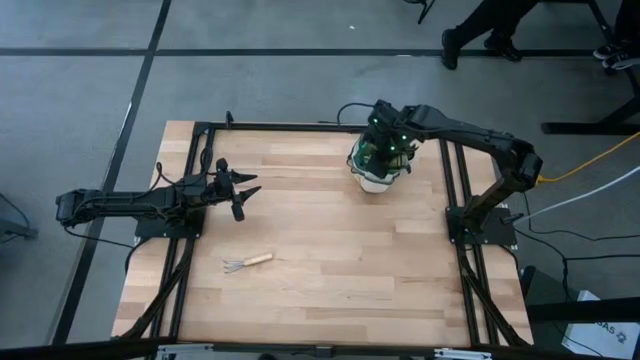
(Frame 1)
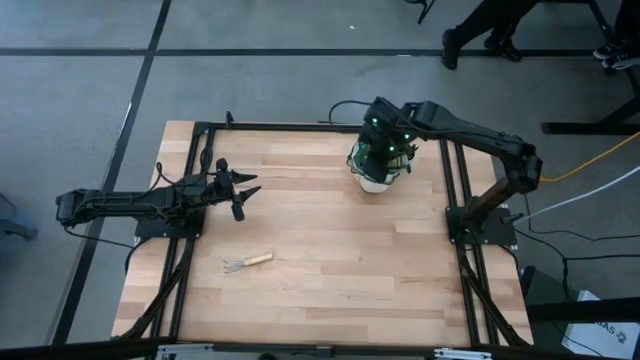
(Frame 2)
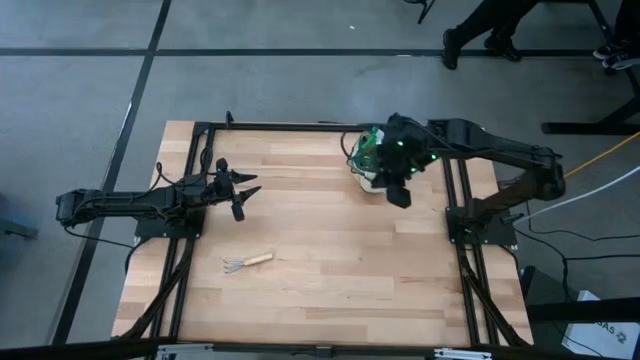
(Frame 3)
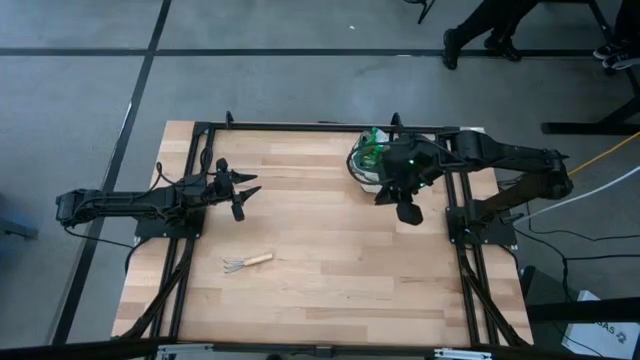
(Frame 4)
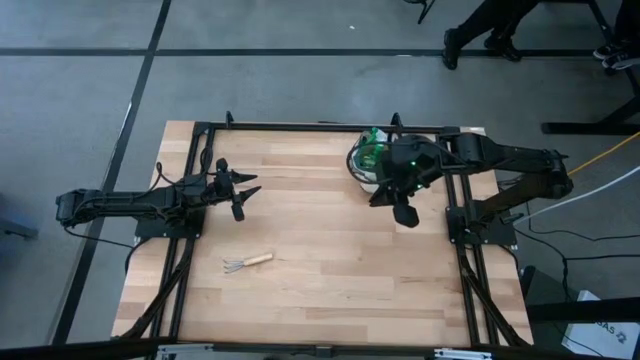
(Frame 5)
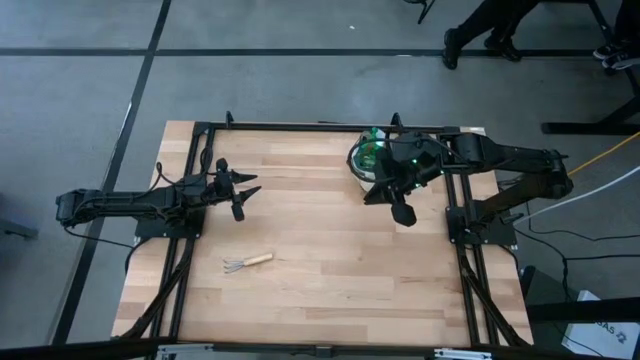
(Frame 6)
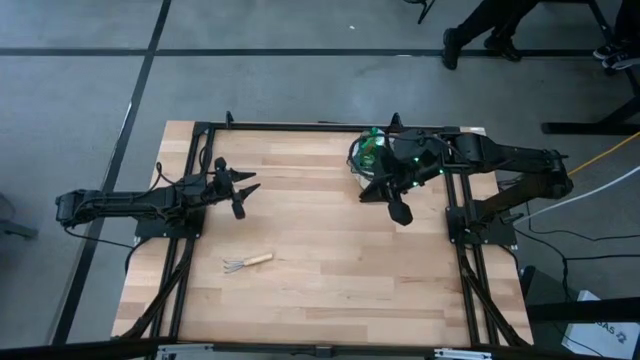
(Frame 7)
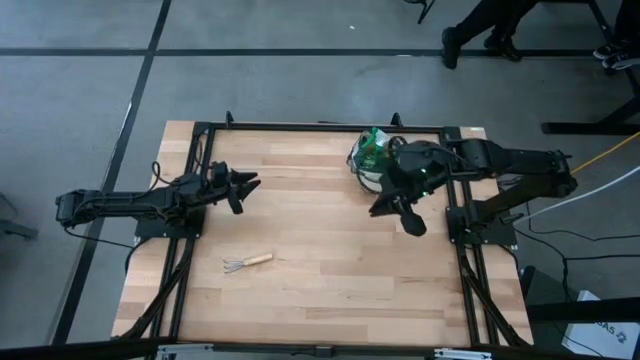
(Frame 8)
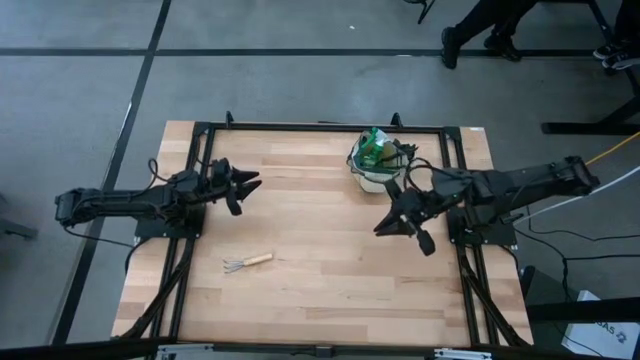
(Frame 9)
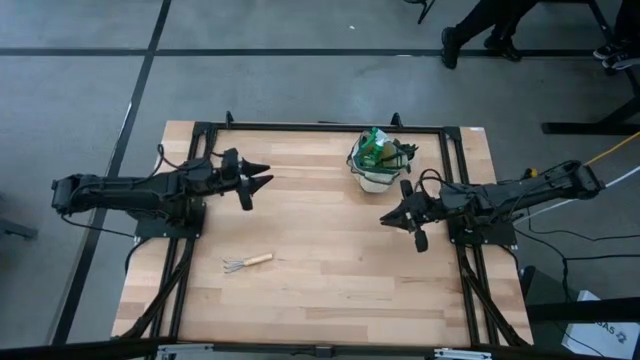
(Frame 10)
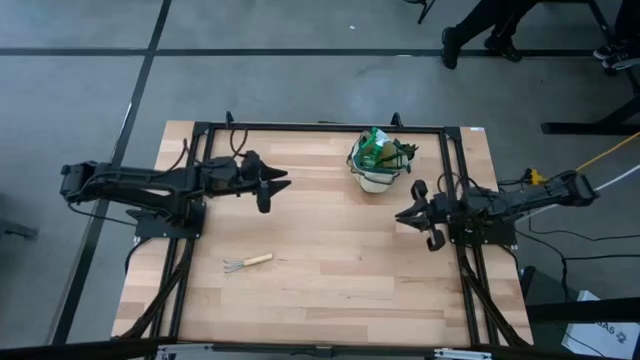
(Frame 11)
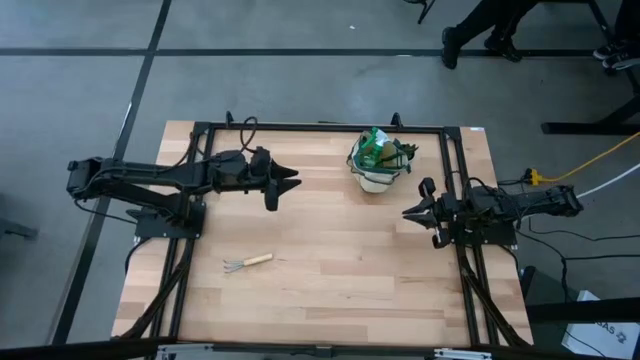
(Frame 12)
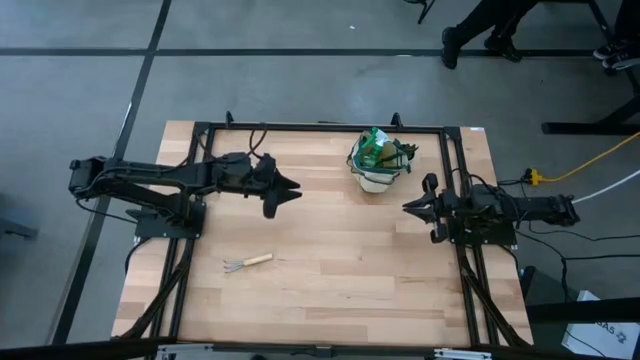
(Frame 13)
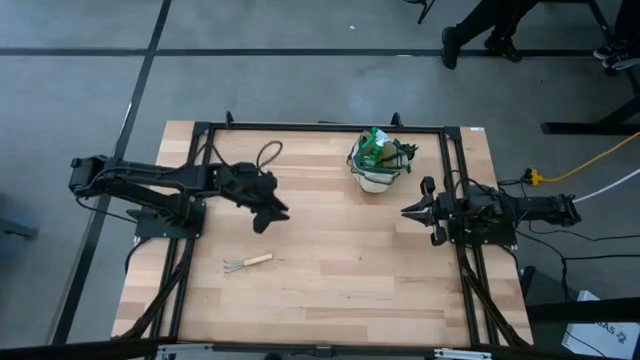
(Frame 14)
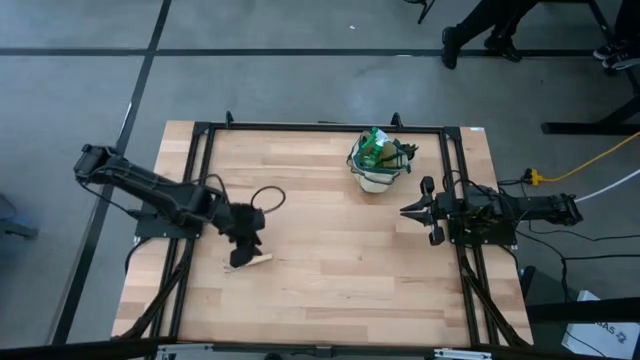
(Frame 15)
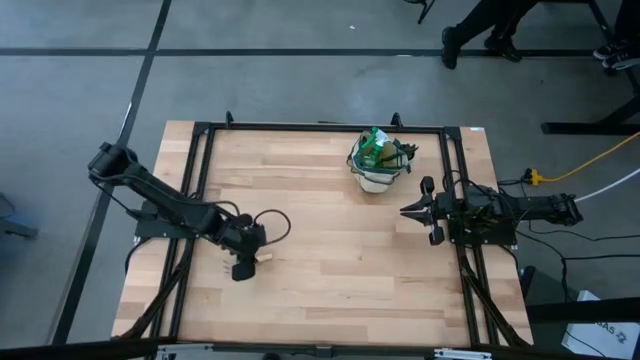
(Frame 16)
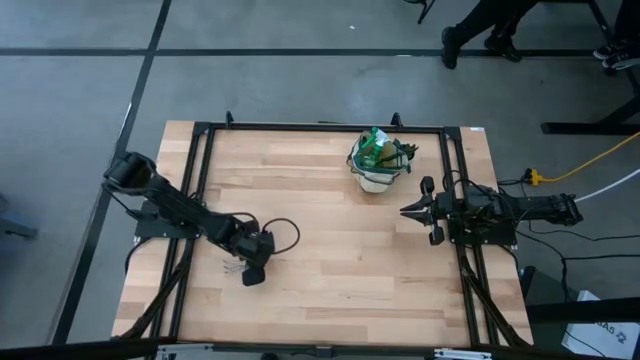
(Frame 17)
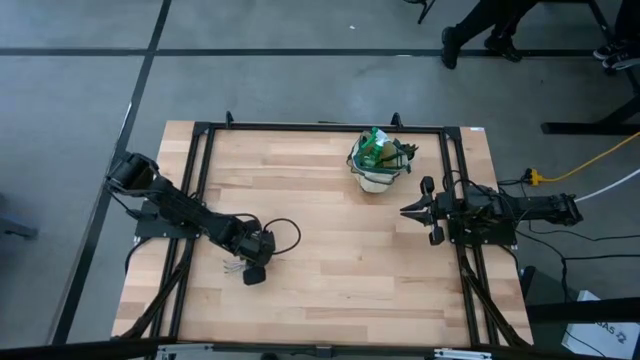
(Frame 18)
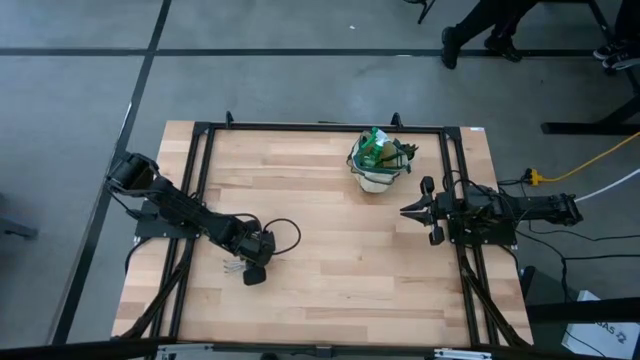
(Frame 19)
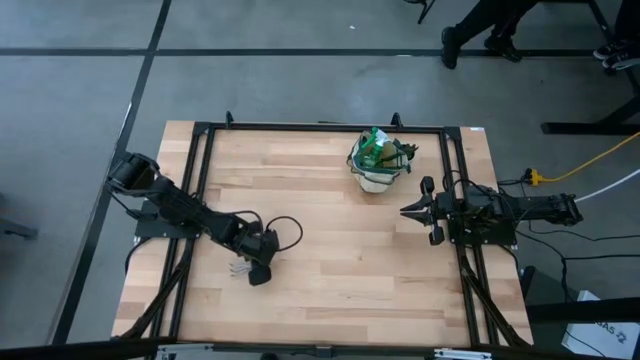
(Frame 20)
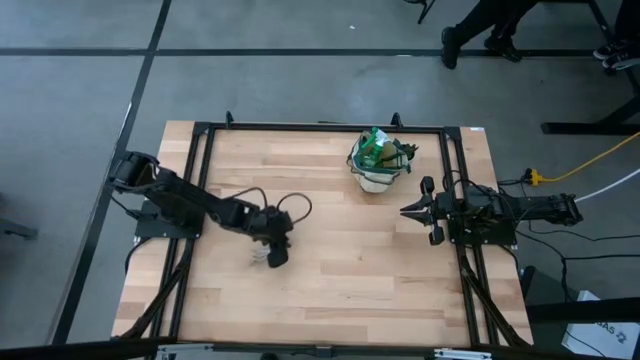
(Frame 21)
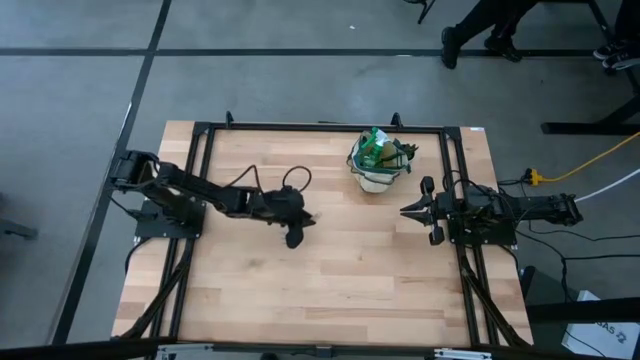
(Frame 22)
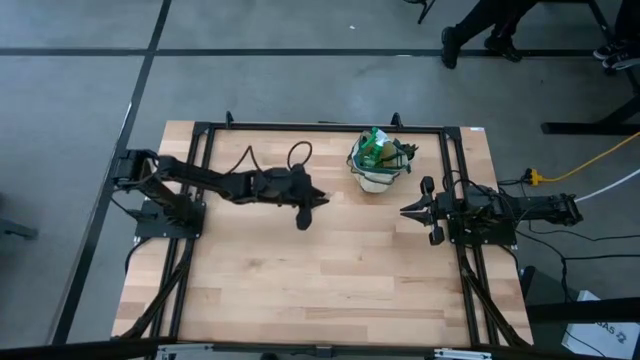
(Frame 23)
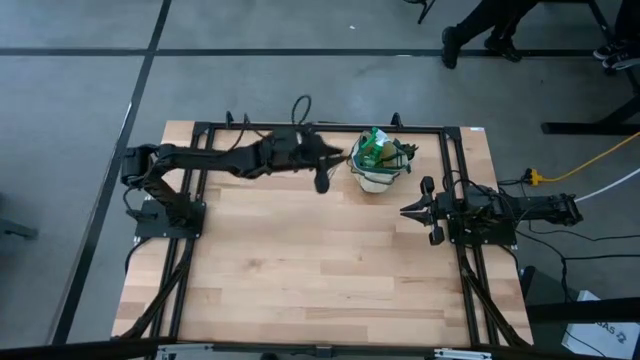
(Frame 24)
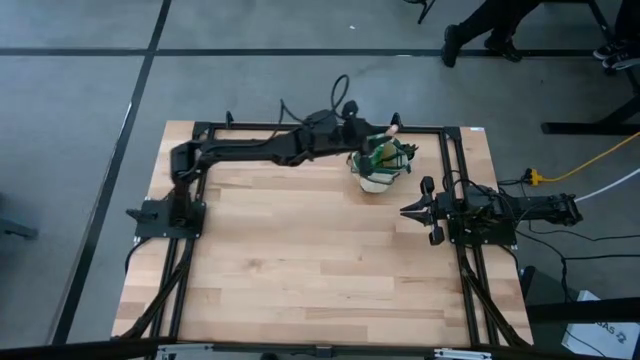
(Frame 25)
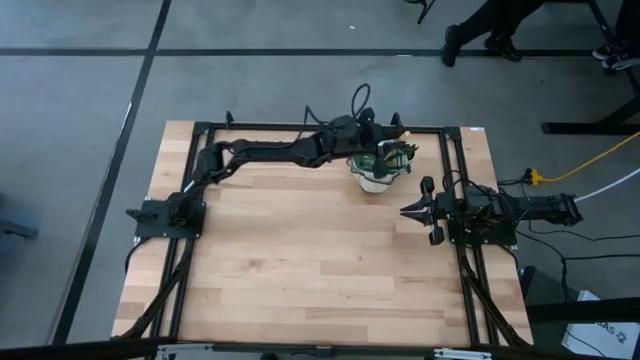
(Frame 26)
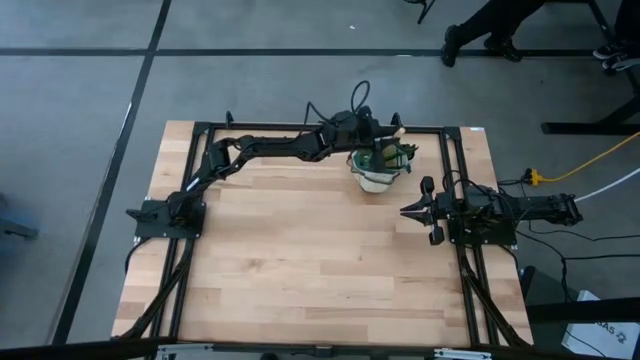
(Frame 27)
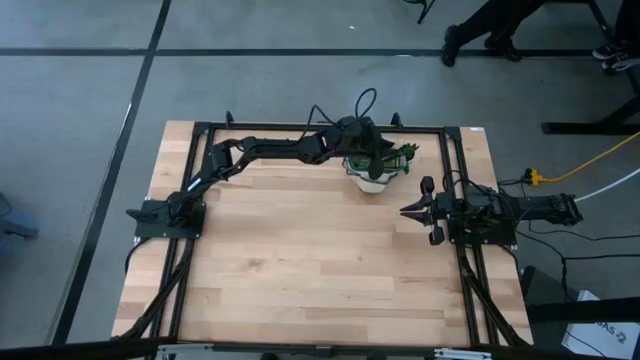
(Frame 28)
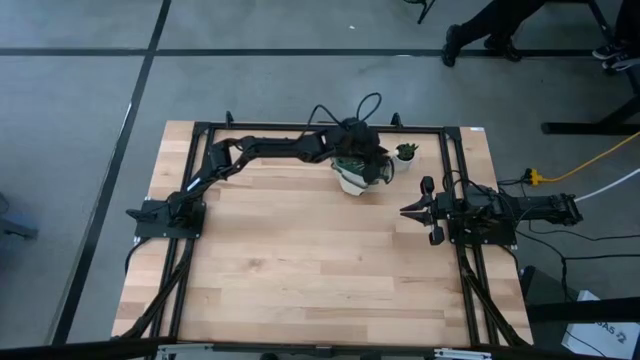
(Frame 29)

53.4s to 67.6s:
Task: Pick & Place Garden tools in Gardening bag
Put the brown hand rake into the brown gardening bag

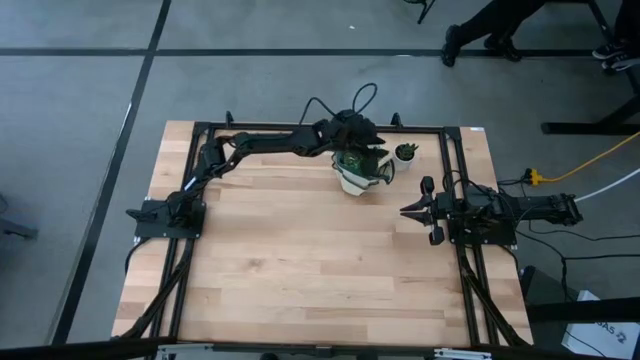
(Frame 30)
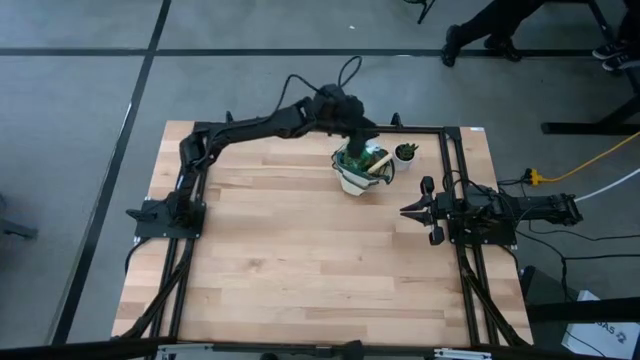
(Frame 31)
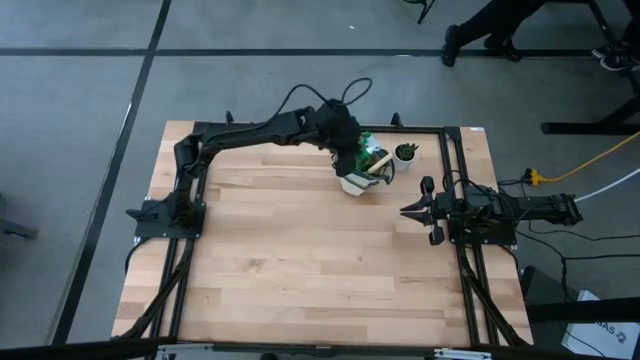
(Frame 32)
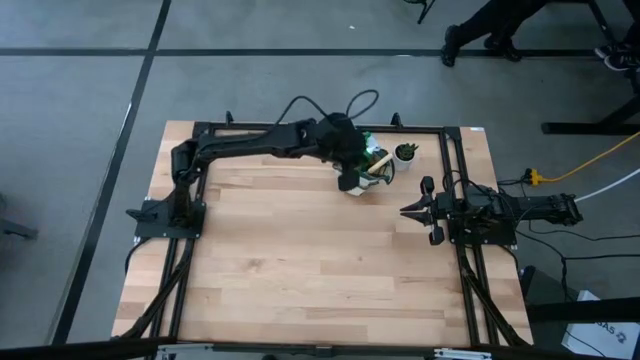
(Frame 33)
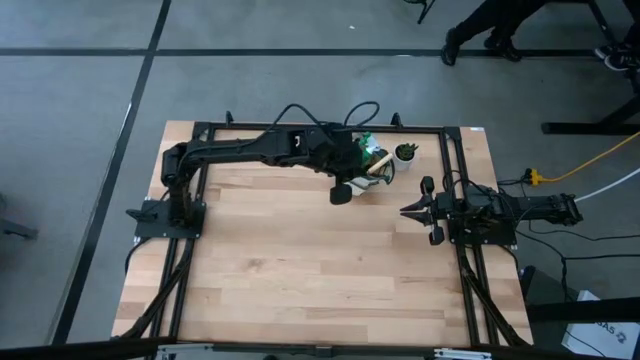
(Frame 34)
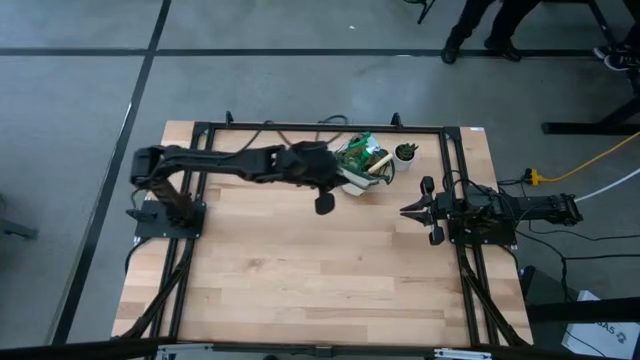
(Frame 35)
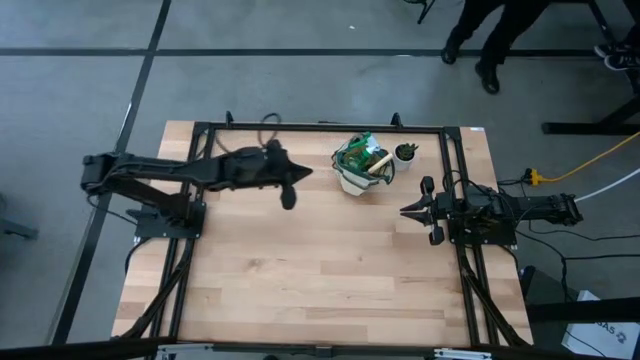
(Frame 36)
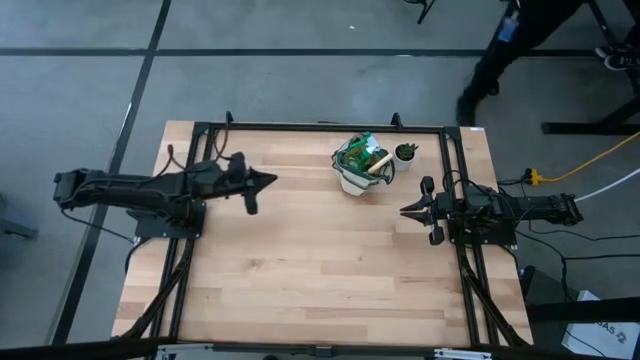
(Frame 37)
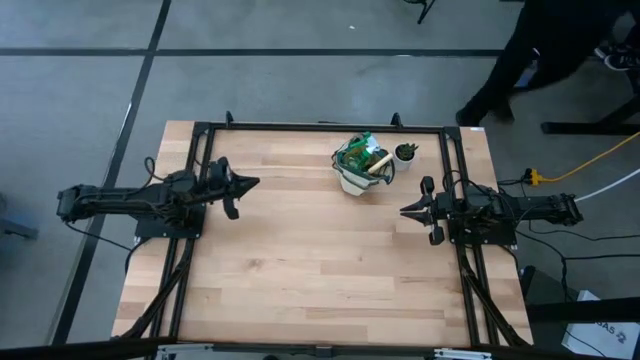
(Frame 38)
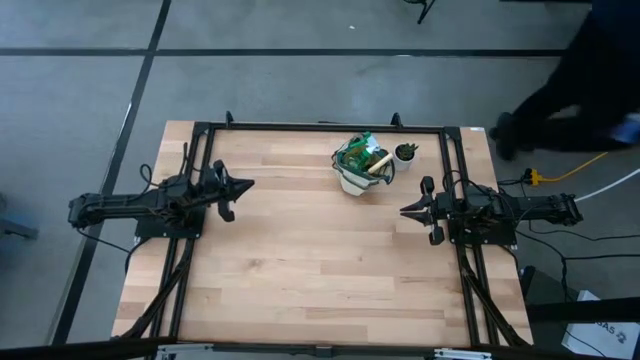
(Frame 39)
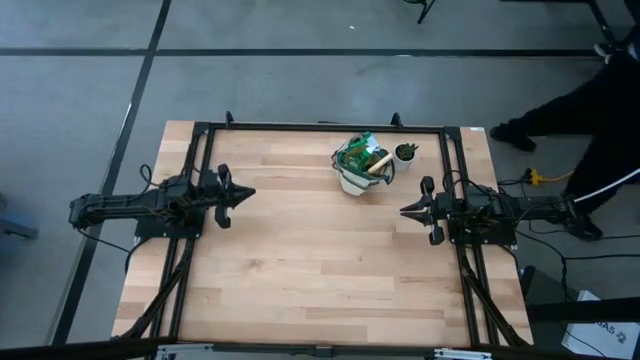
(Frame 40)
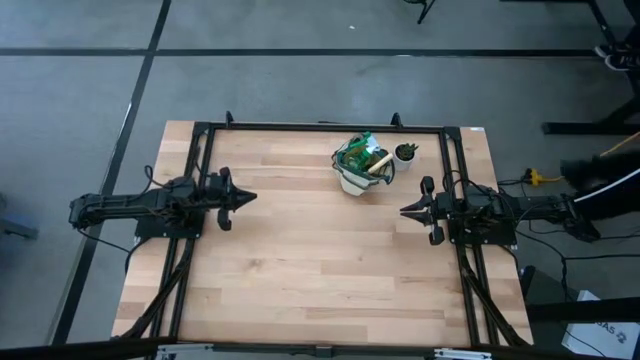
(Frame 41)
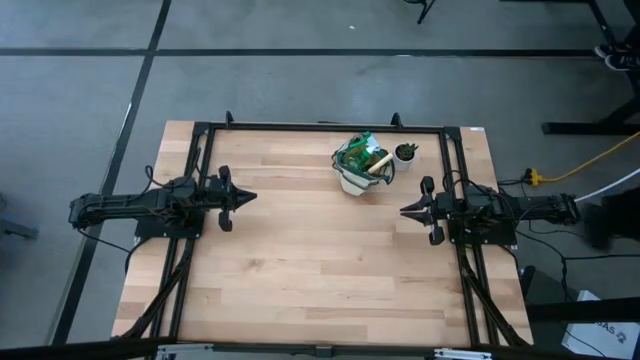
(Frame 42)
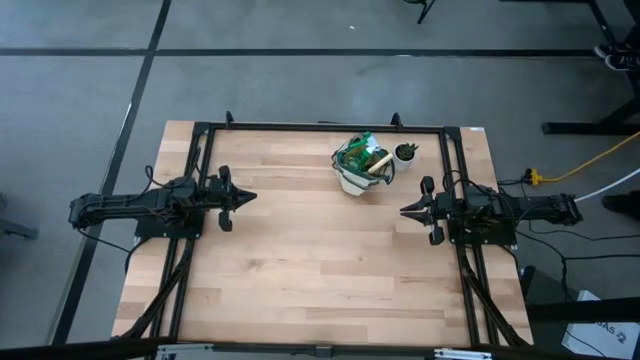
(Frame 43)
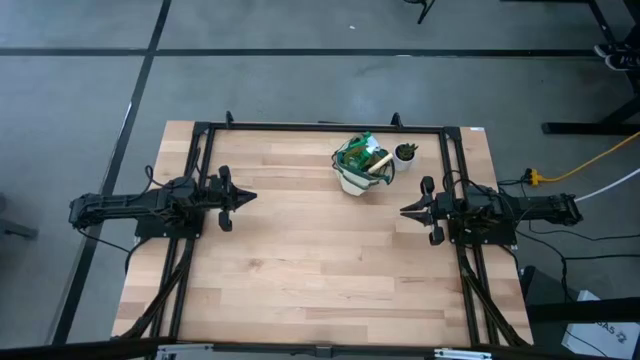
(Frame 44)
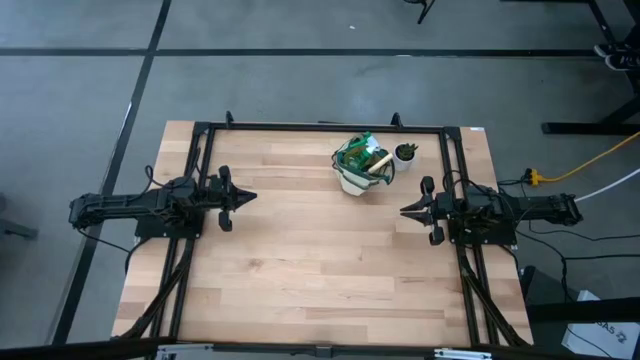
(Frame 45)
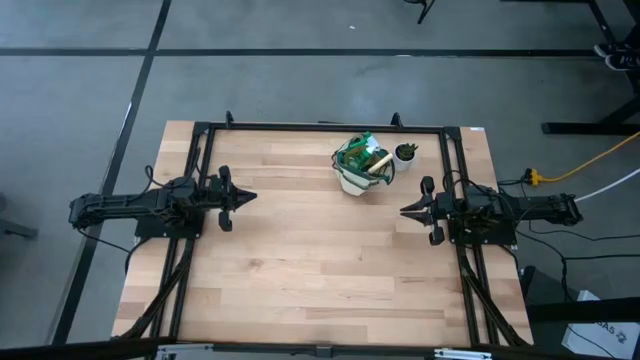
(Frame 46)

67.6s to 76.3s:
Return to Home Position
